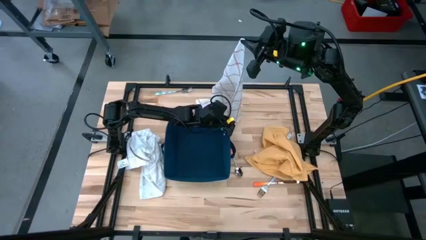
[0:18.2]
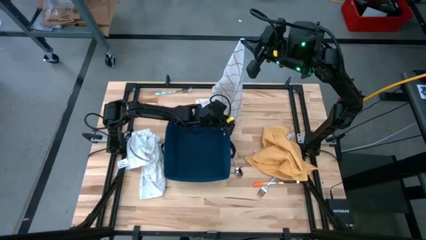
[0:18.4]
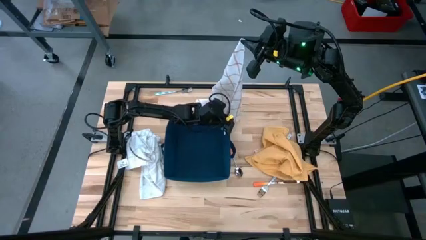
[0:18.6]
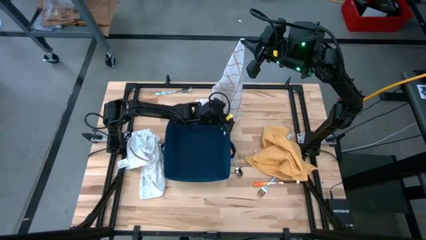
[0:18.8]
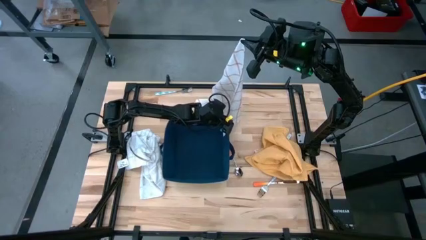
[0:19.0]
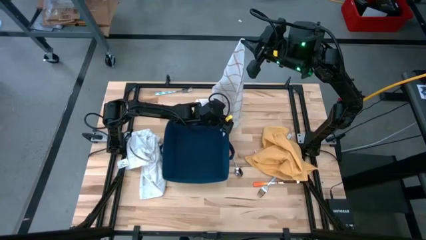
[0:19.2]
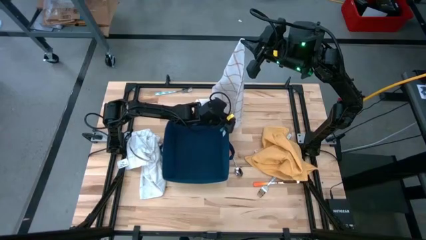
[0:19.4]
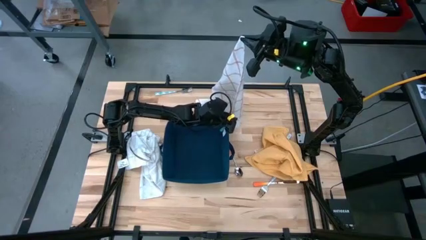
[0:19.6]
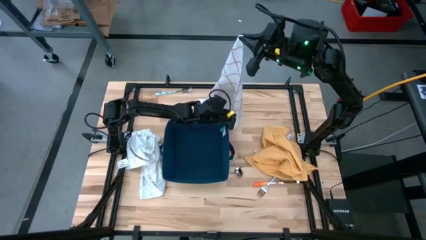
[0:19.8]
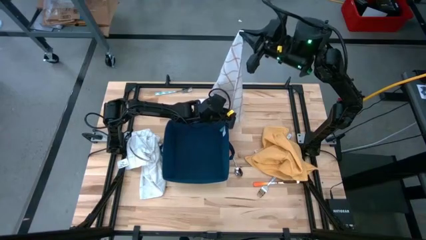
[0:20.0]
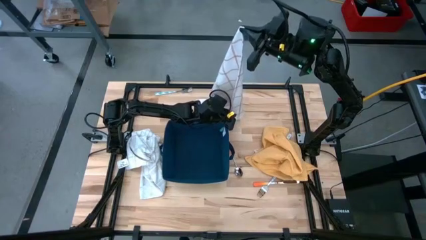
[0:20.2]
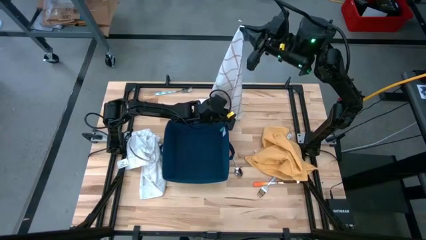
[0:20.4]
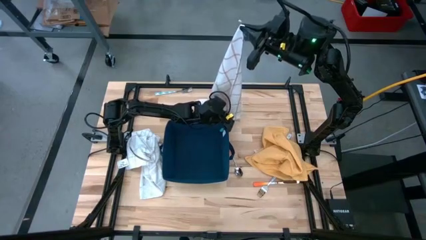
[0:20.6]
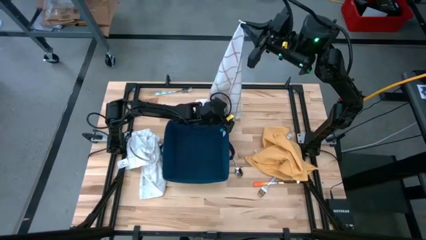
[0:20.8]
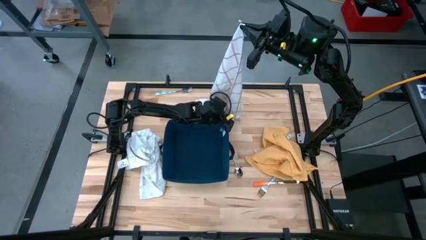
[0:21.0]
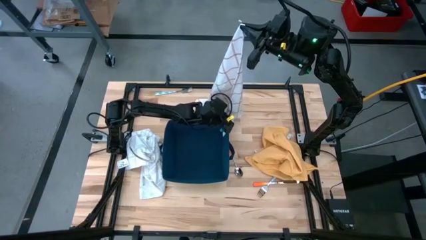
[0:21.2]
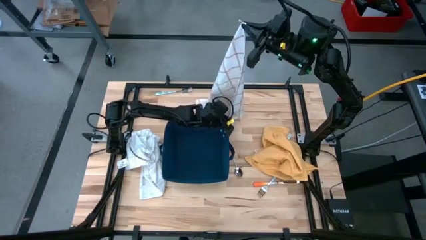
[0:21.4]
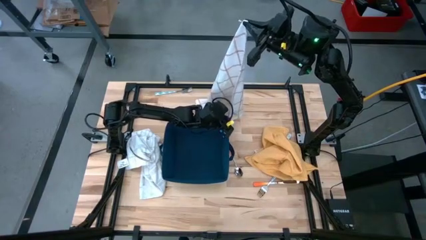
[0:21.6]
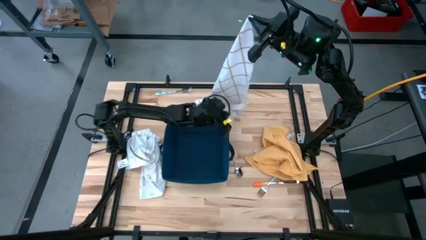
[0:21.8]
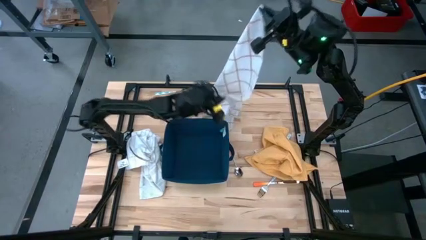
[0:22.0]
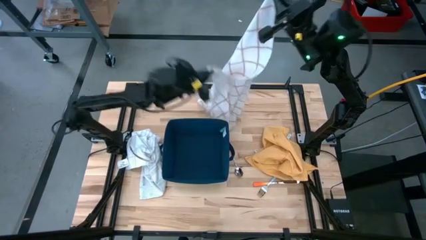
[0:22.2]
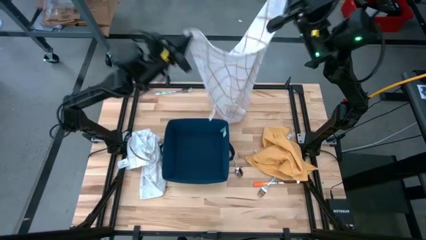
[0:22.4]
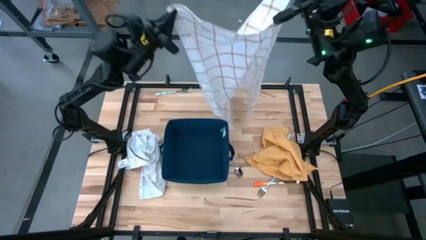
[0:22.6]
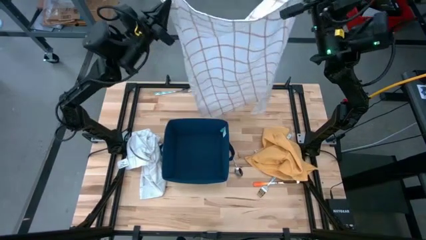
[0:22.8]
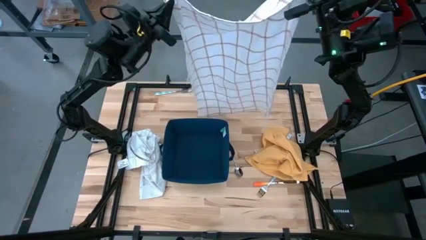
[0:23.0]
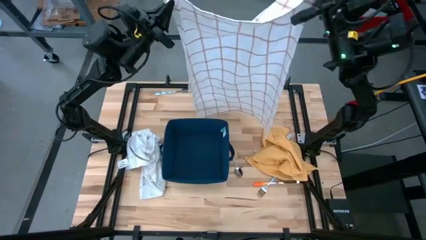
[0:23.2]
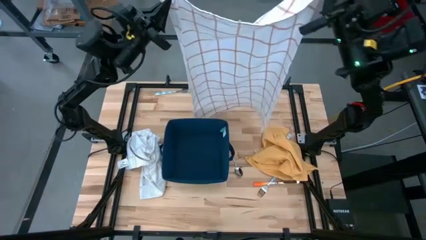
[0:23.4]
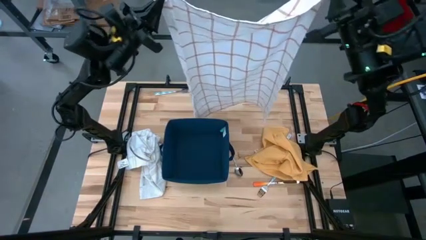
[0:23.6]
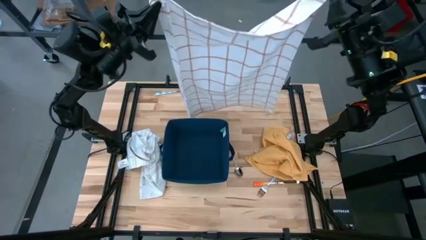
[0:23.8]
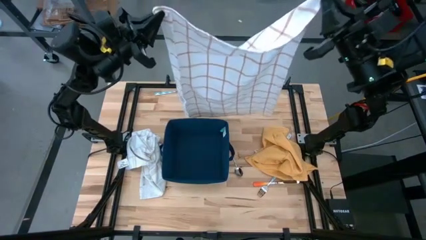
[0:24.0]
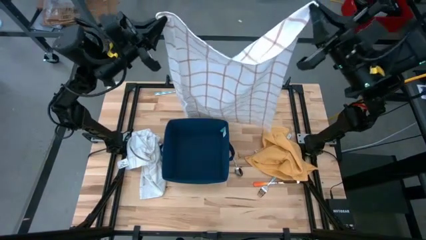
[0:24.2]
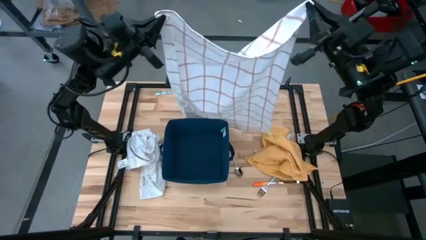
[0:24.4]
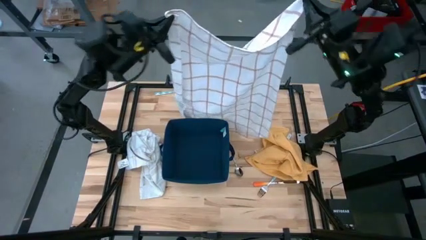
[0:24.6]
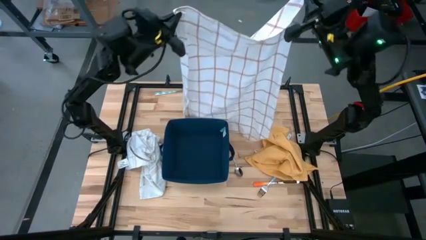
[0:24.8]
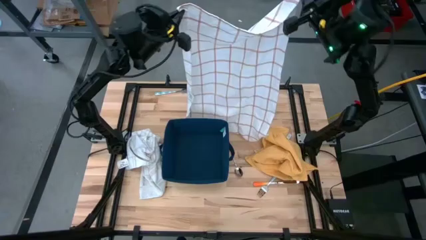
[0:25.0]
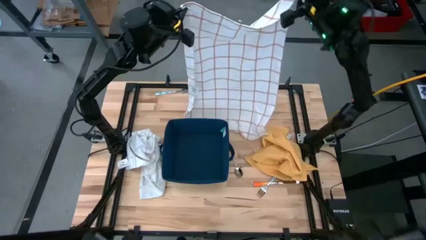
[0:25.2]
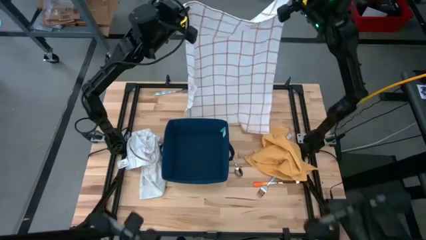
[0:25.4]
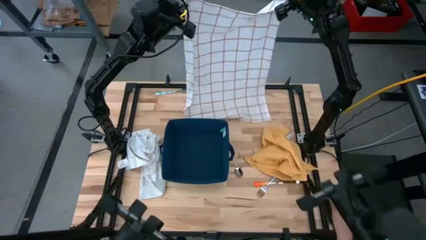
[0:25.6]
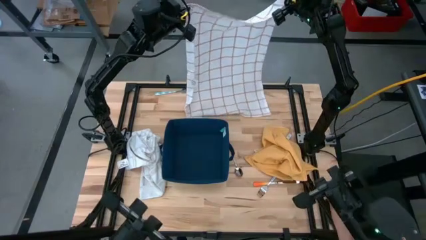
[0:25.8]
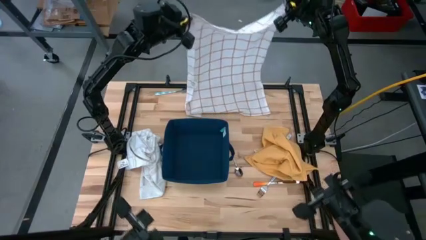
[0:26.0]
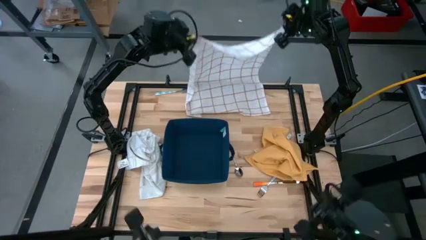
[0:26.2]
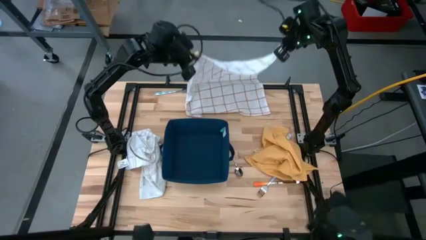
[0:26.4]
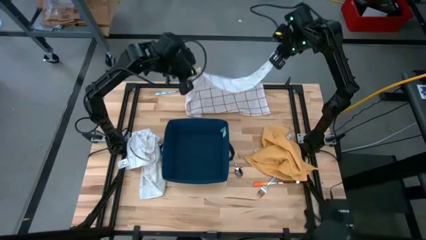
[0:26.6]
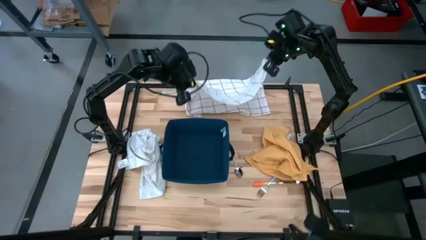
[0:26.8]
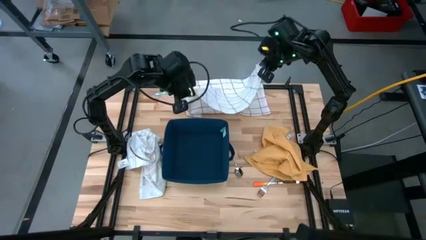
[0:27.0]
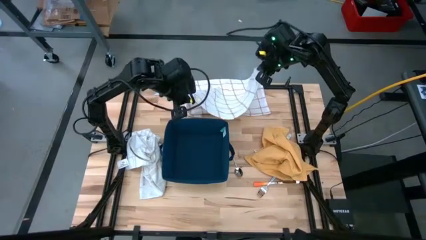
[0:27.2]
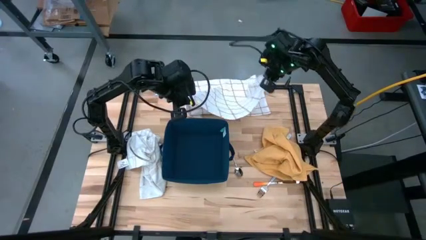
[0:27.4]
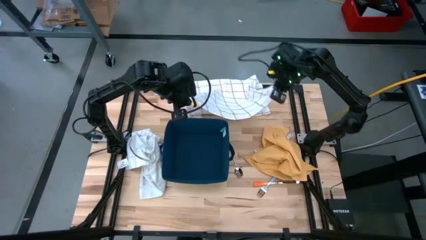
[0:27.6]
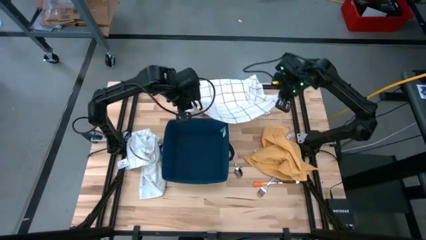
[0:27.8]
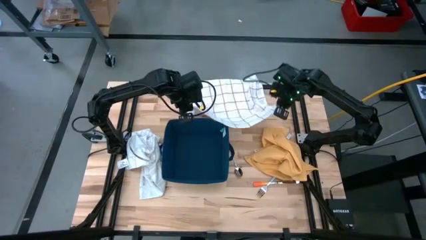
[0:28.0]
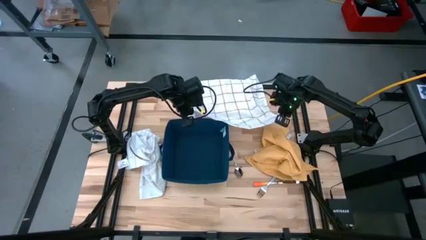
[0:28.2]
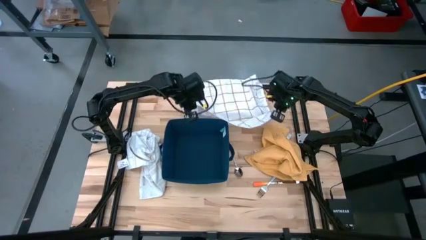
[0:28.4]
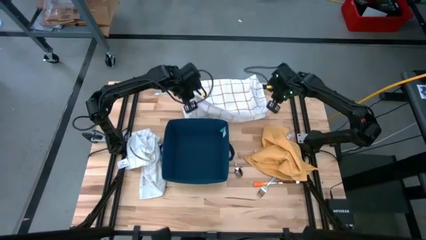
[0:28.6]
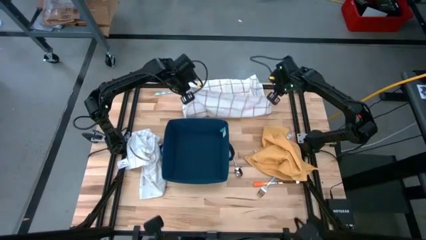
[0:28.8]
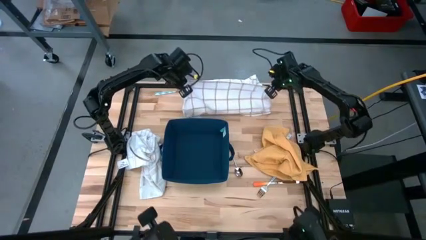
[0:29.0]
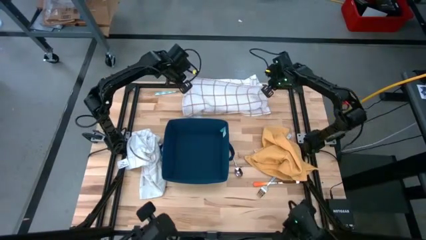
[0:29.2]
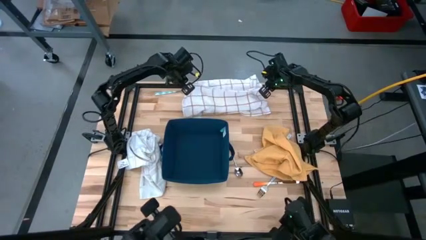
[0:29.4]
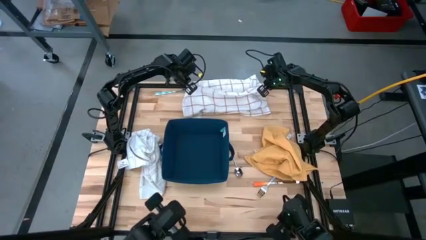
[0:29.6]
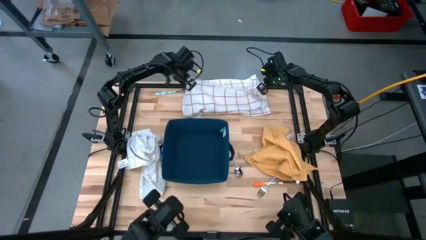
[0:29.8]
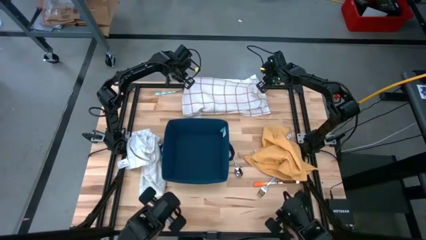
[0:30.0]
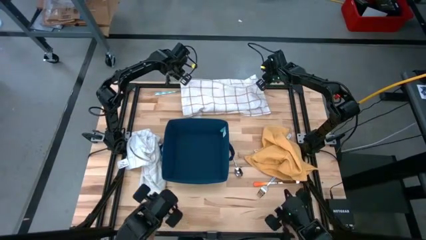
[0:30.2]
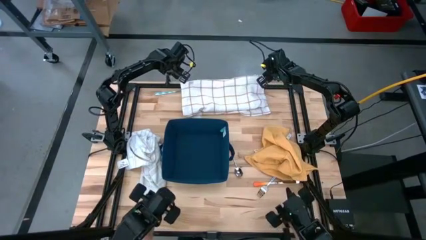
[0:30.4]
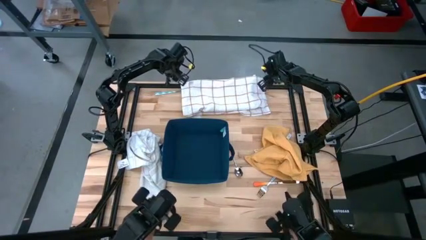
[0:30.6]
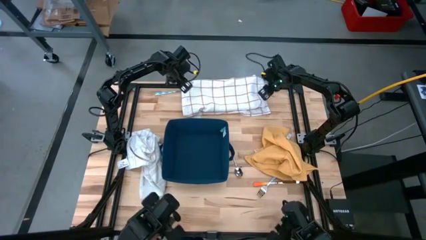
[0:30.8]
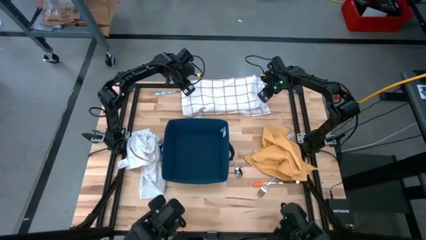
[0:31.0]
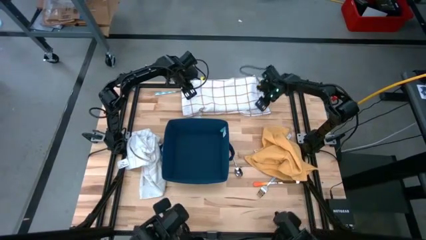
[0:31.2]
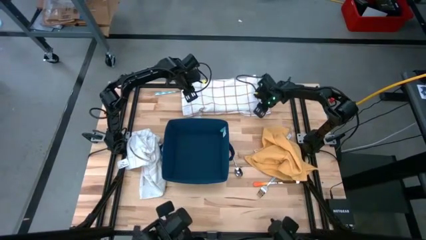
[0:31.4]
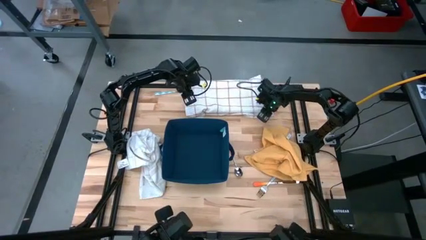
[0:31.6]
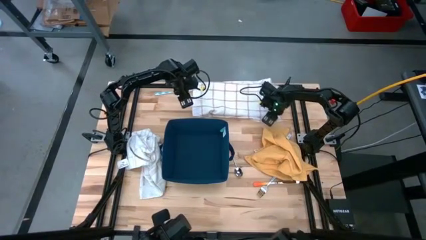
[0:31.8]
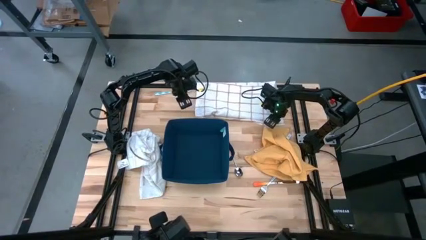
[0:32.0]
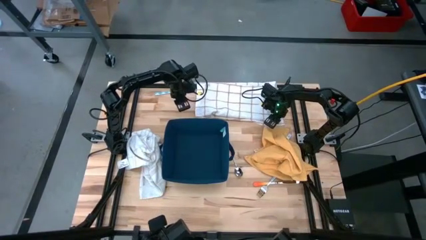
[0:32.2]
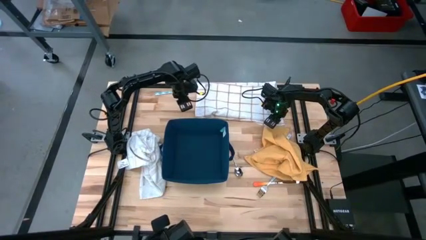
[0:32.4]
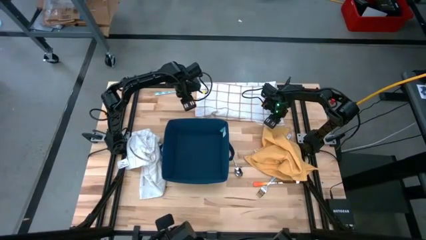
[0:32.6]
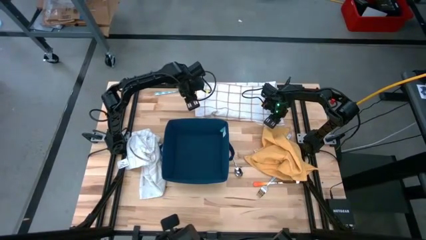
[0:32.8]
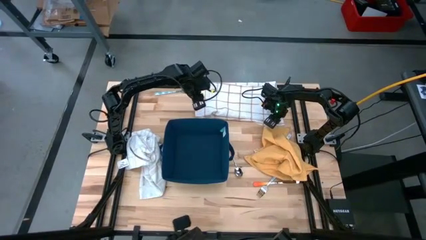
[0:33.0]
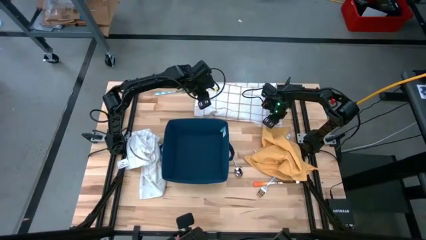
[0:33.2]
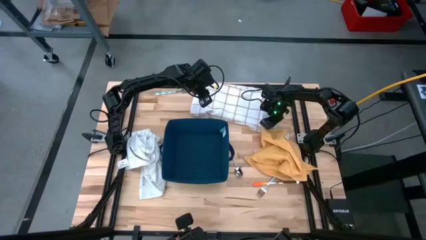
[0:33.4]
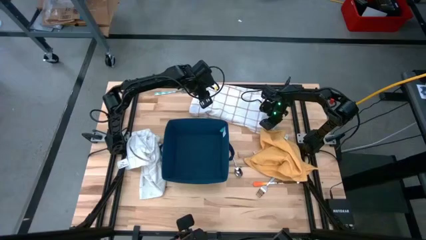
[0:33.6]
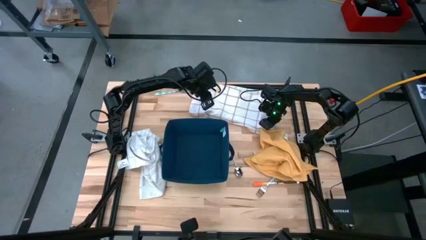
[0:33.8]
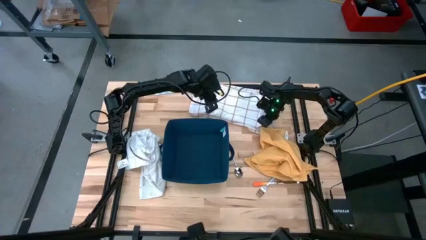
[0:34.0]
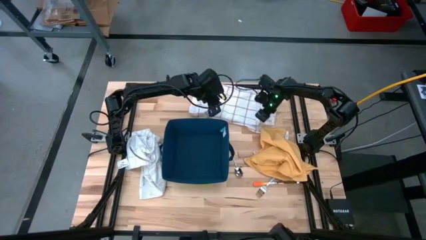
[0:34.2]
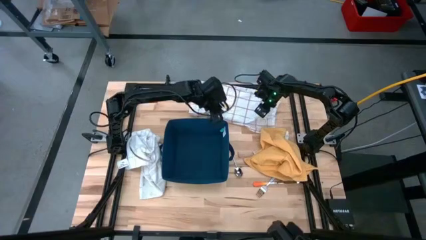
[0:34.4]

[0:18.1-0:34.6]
Task: Fold towel
Fold the right white patterned towel
